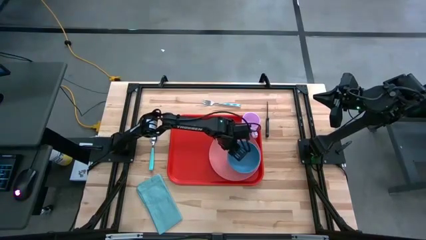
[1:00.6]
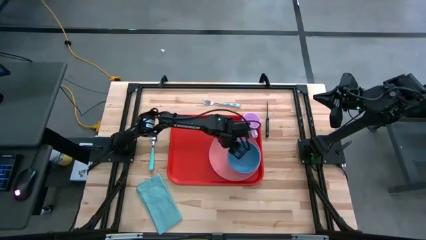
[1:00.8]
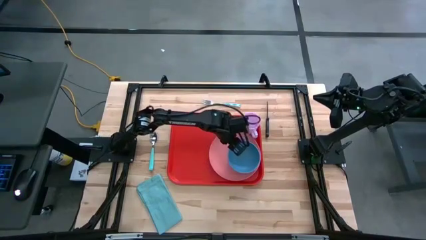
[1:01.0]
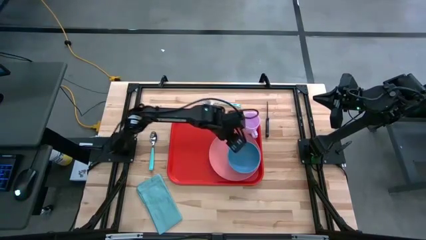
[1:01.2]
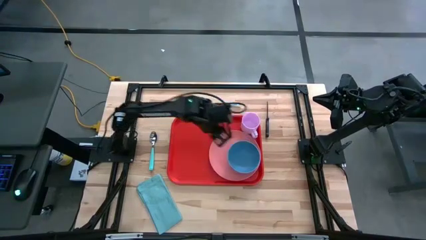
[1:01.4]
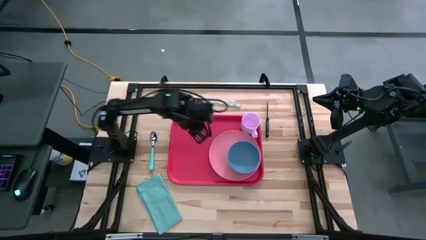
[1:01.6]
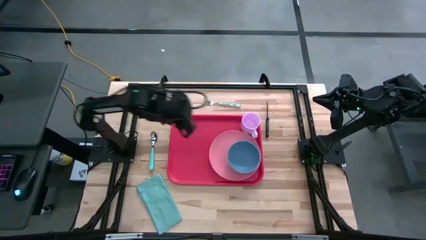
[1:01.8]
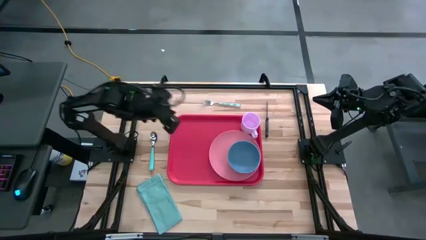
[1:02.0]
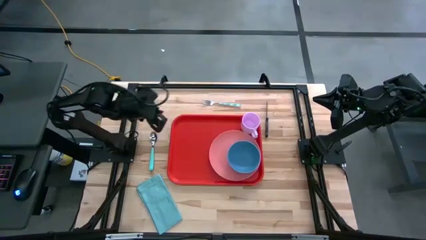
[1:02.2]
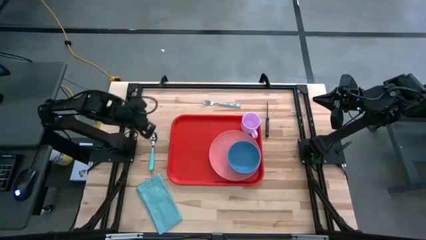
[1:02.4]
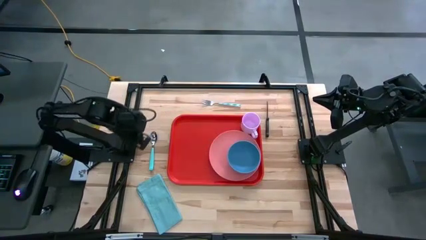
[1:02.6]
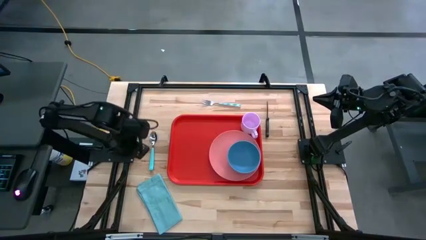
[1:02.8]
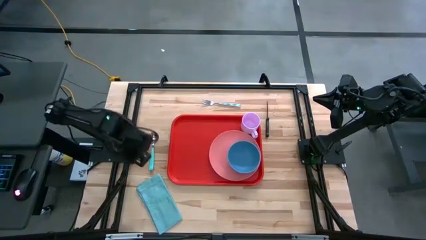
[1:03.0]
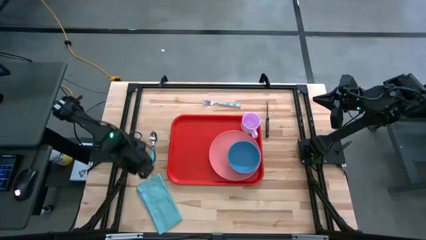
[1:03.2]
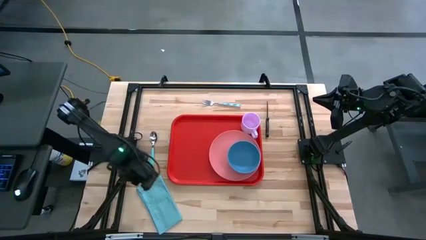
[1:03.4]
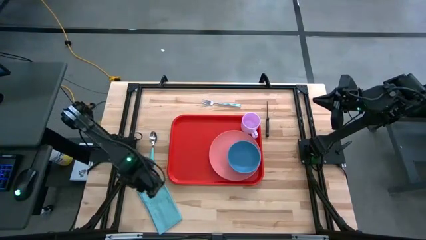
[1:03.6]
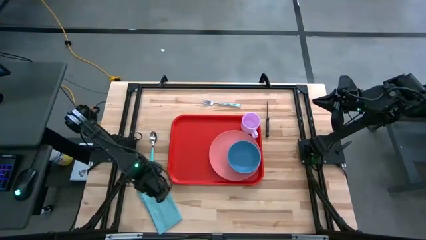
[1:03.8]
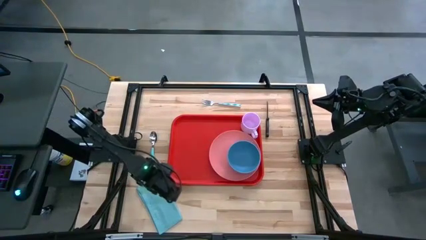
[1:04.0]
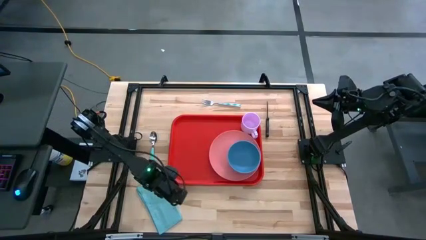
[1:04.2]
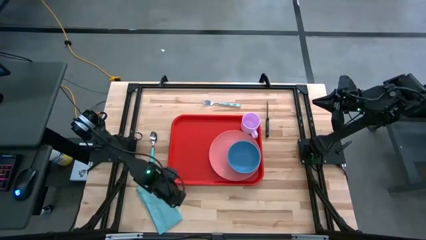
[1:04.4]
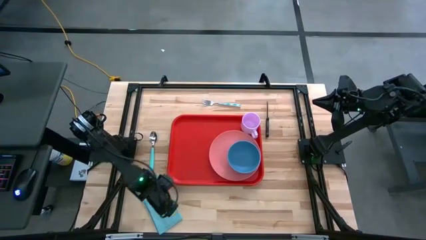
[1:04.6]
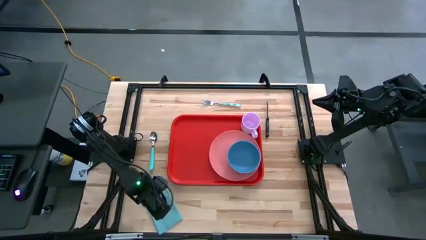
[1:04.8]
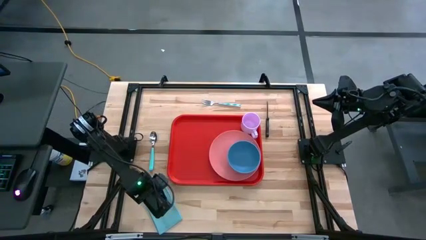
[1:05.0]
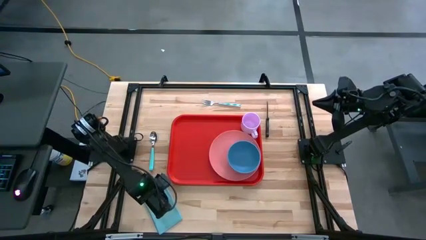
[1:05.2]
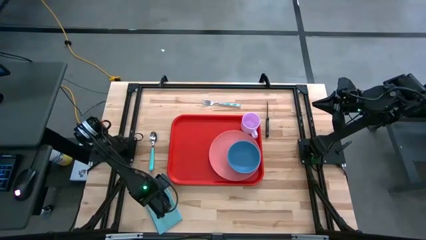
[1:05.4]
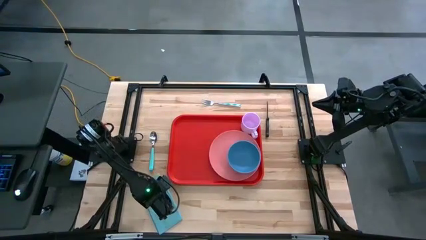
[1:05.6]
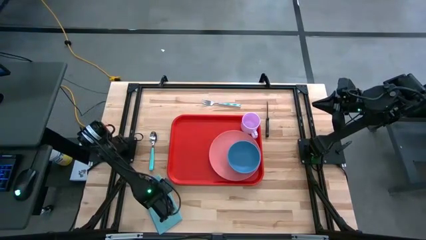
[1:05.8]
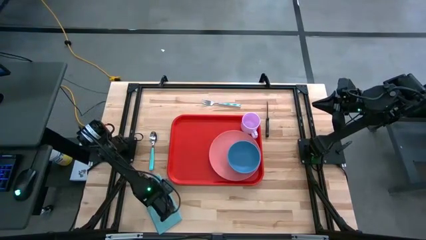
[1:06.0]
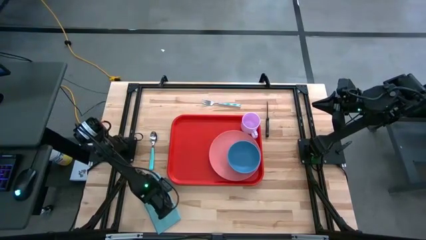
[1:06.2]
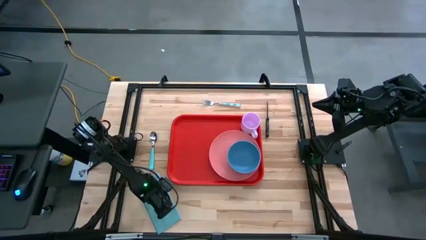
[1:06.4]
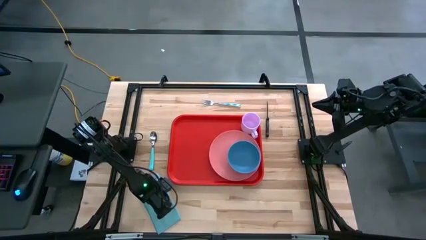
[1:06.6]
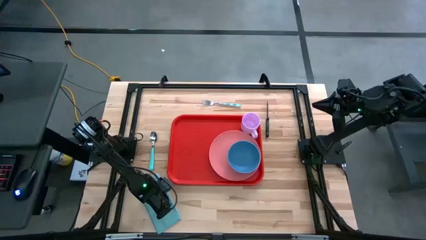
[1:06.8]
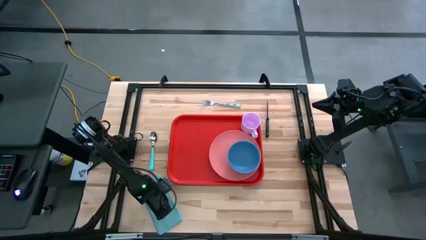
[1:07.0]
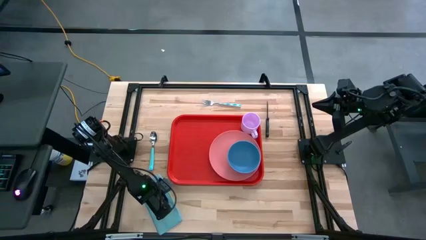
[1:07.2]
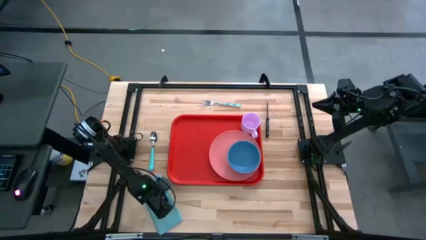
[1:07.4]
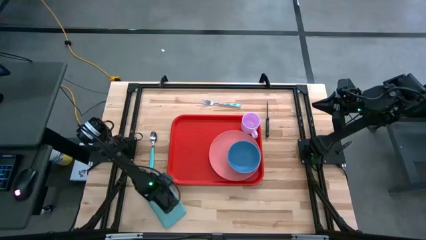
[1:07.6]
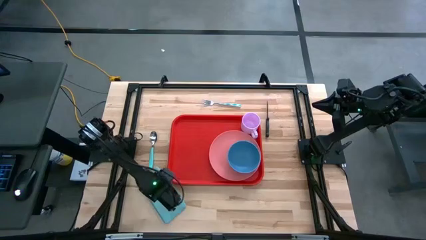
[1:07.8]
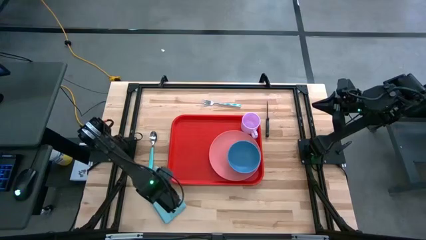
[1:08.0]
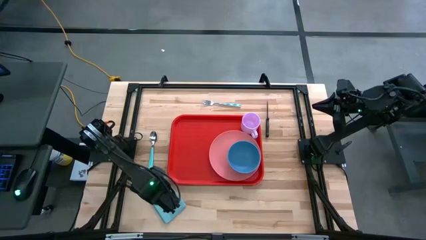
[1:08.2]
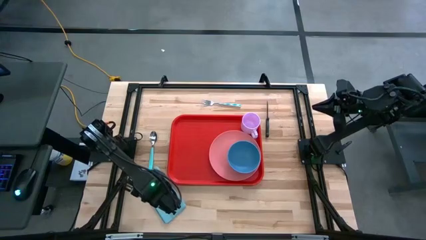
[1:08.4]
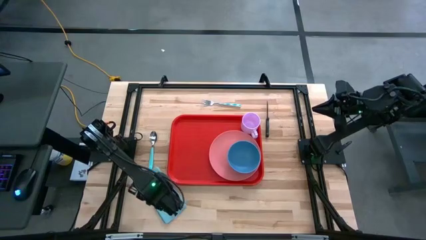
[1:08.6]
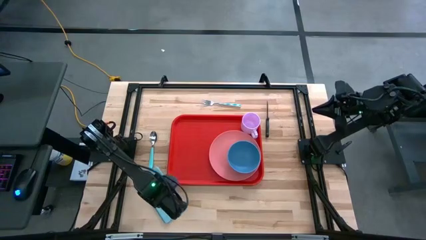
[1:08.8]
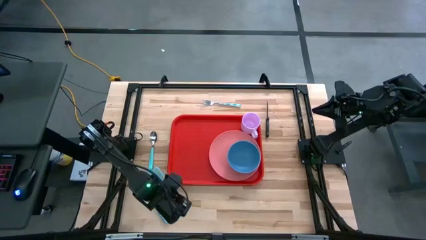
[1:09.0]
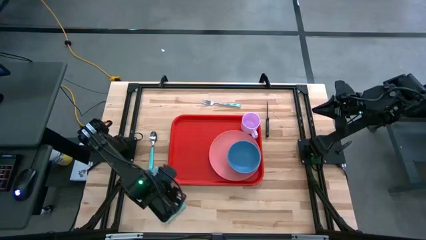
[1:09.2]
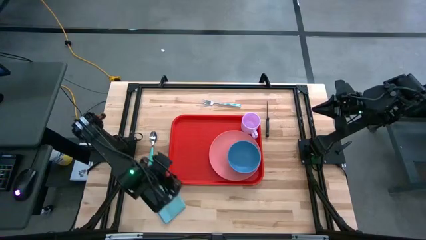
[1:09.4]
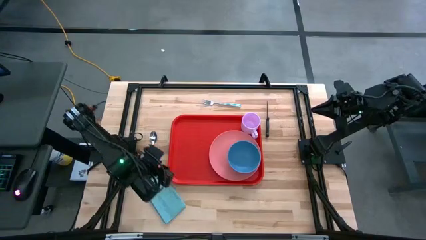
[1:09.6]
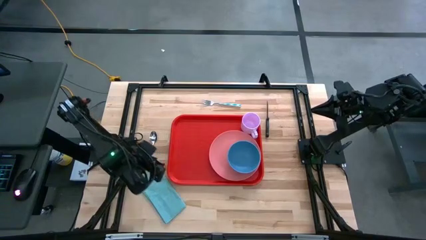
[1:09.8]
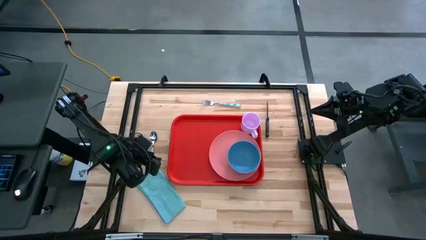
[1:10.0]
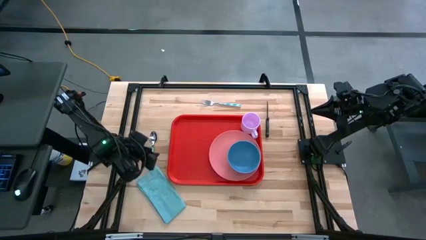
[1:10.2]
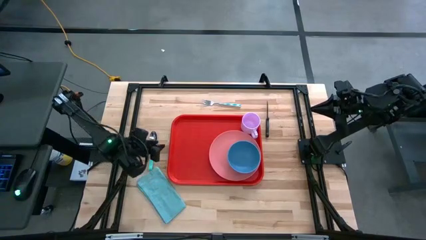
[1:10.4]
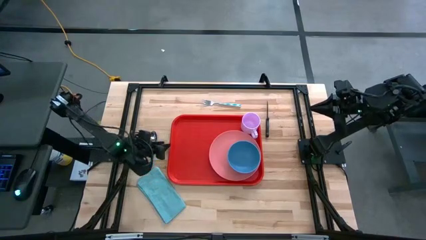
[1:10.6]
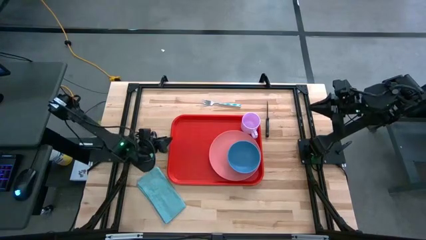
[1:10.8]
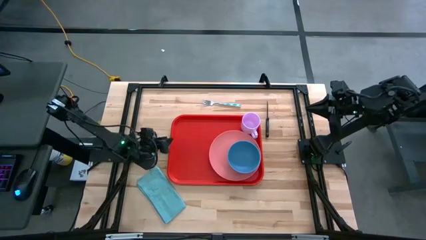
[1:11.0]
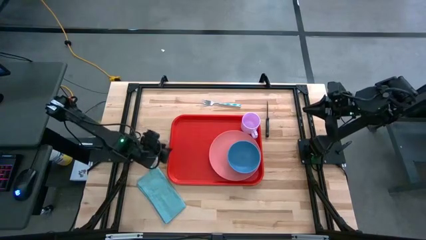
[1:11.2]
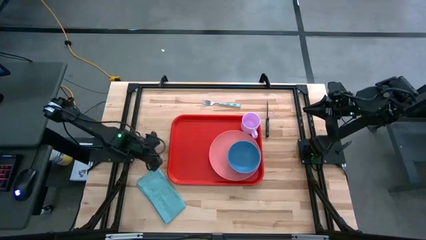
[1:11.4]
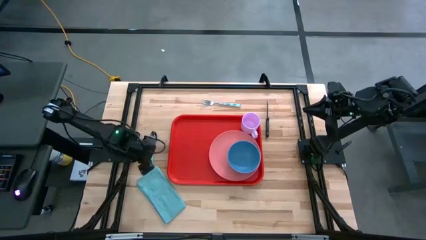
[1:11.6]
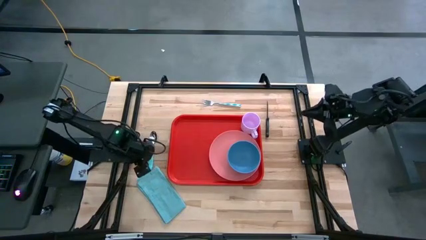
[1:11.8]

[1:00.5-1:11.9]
Task: Set up tray
Put the blue napkin on the red tray to the left of the pink plate

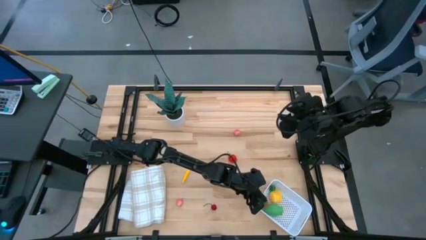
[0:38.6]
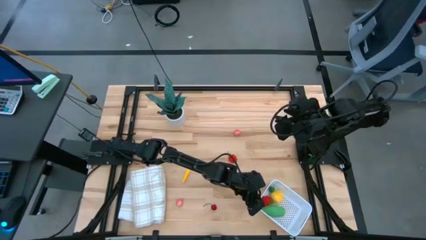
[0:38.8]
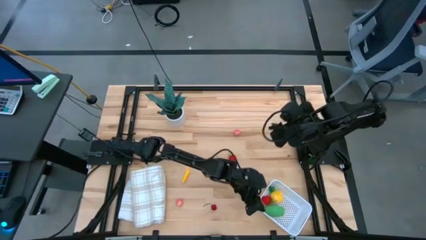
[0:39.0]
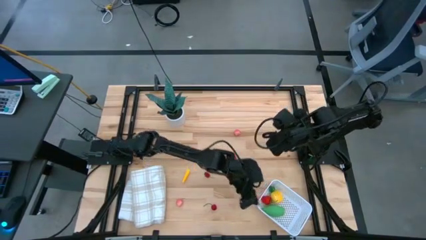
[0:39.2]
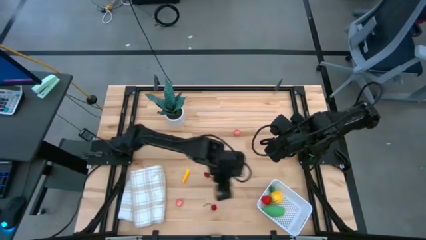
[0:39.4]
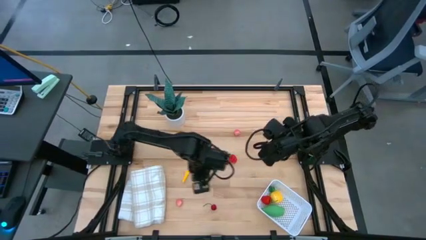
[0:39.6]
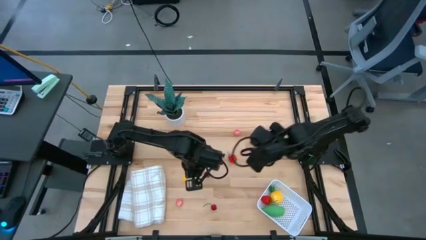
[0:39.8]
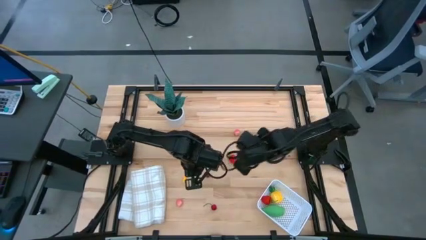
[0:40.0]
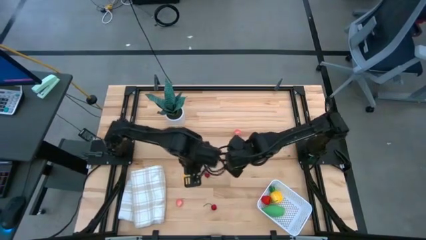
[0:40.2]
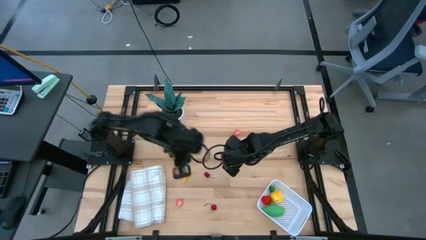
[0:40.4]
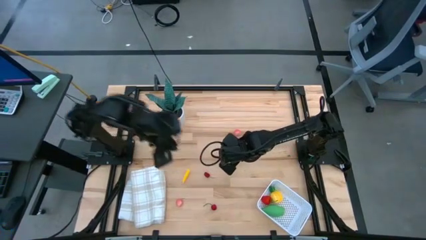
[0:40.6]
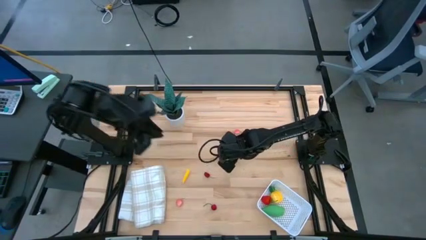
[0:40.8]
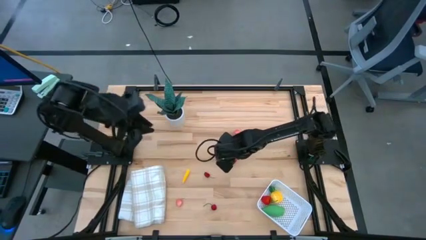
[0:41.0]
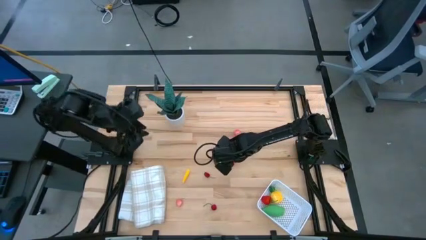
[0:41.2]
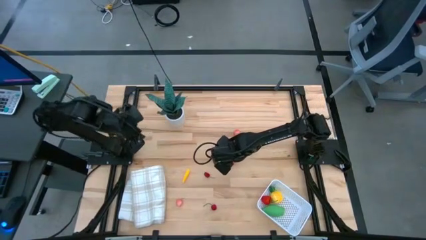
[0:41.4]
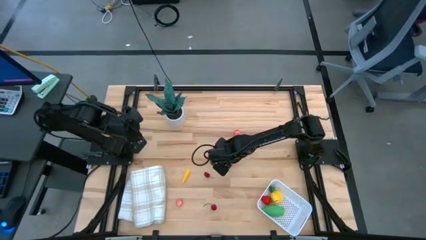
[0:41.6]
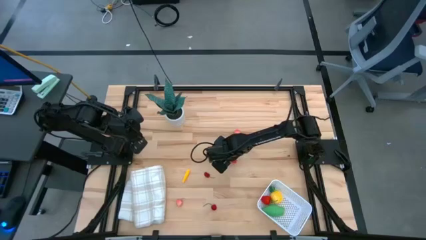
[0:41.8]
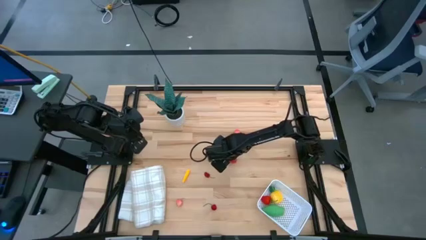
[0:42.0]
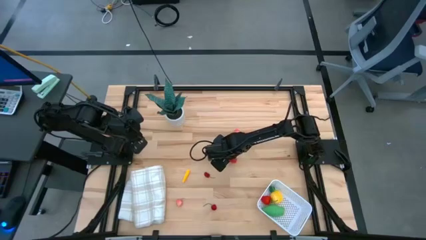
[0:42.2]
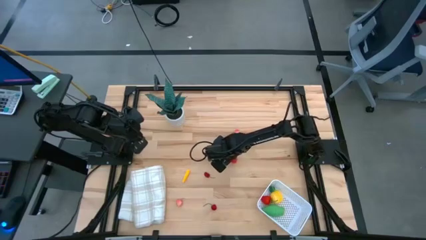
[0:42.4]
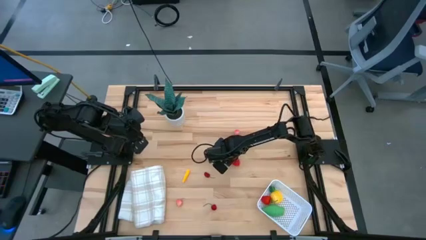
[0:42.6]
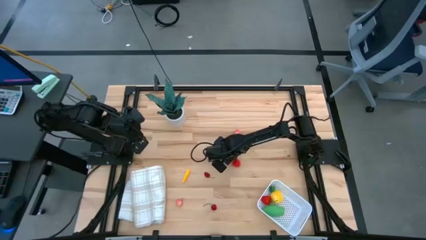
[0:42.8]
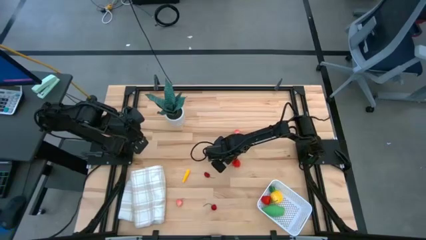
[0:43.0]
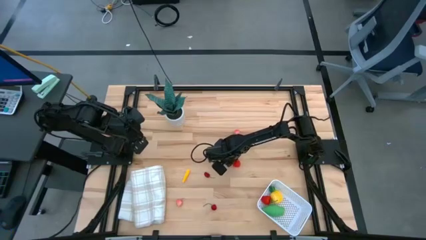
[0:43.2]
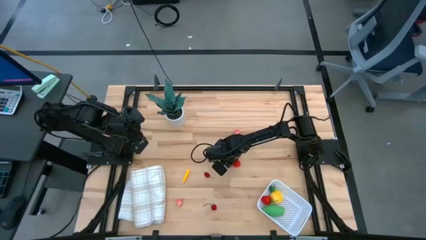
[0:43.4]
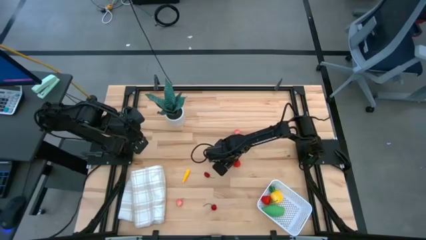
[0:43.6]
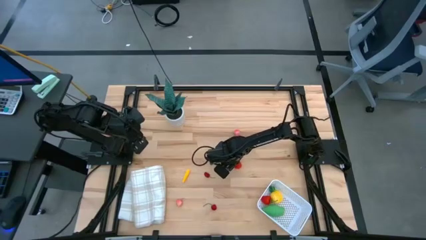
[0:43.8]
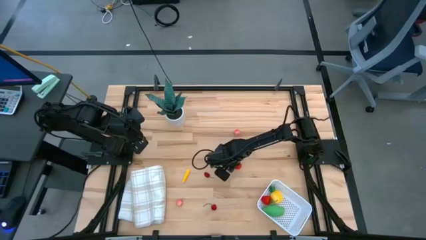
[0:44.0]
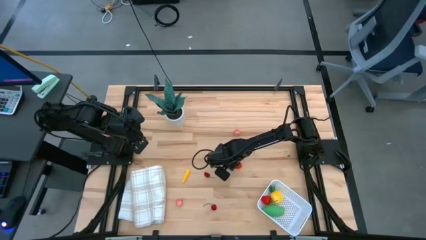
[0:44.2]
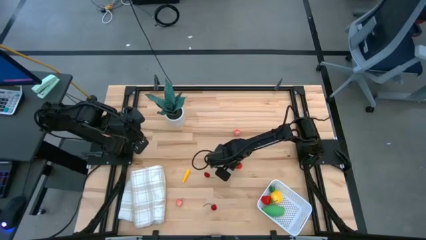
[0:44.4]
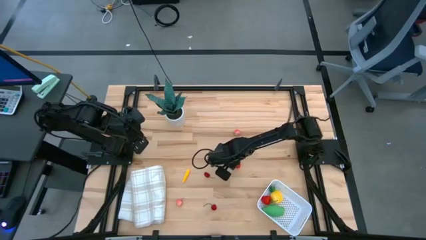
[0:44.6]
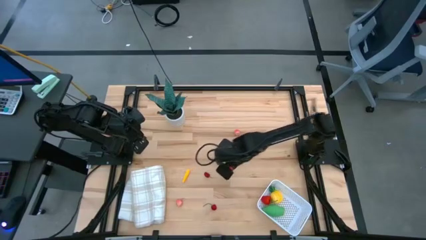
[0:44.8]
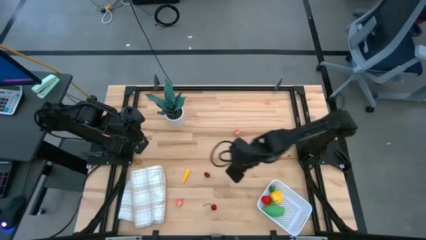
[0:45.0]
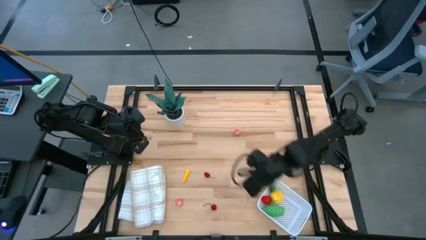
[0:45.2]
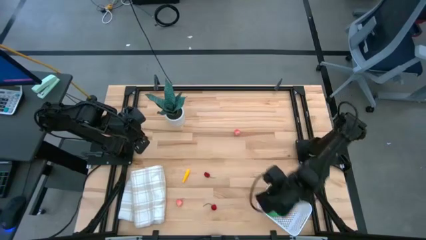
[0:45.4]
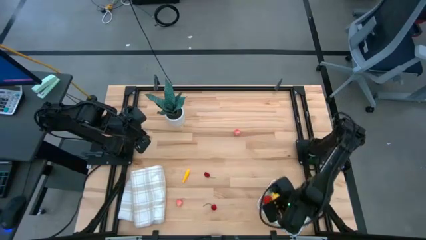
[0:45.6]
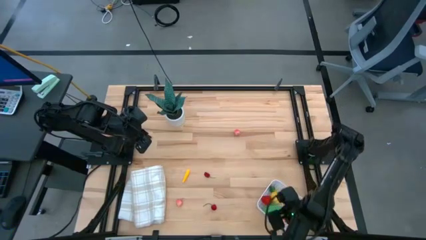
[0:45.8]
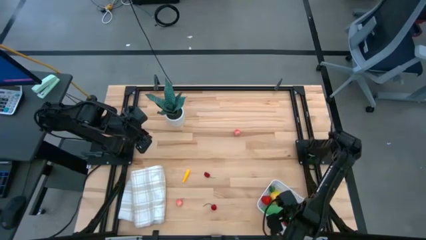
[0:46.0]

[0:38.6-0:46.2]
Task: Pick and placing Produce into tupperware
Put the red strawberry into the white bin
